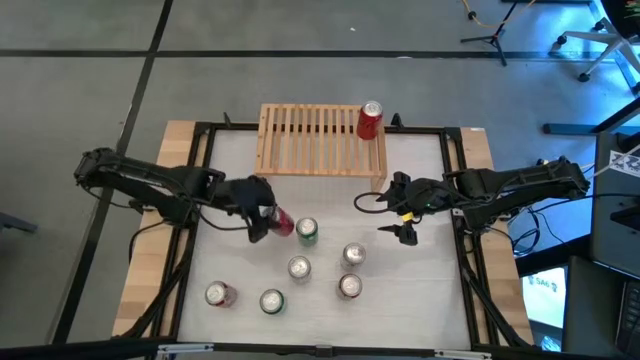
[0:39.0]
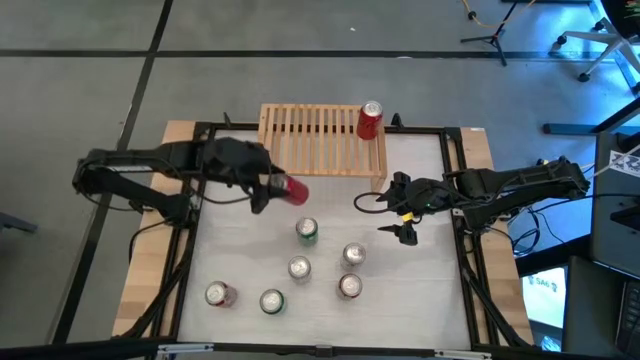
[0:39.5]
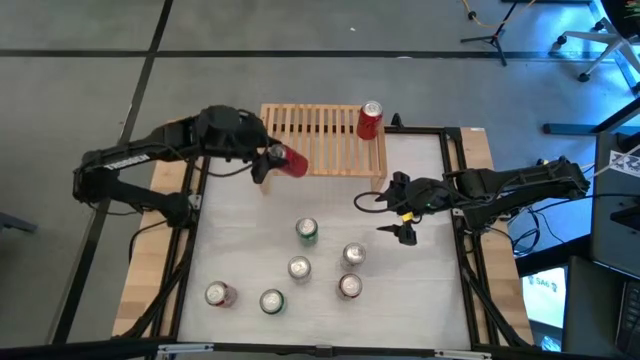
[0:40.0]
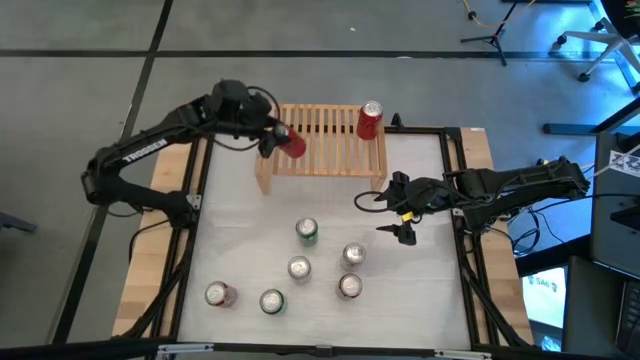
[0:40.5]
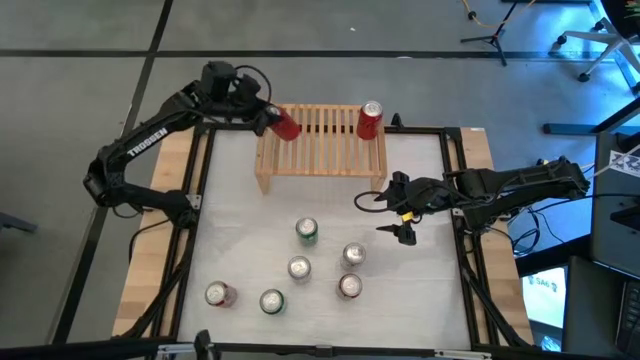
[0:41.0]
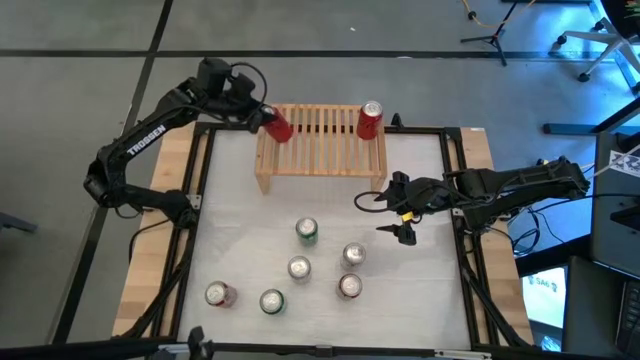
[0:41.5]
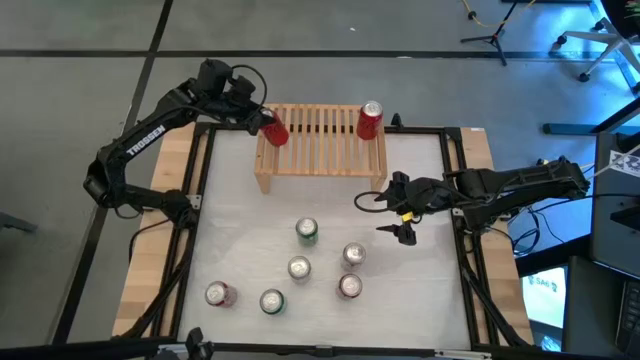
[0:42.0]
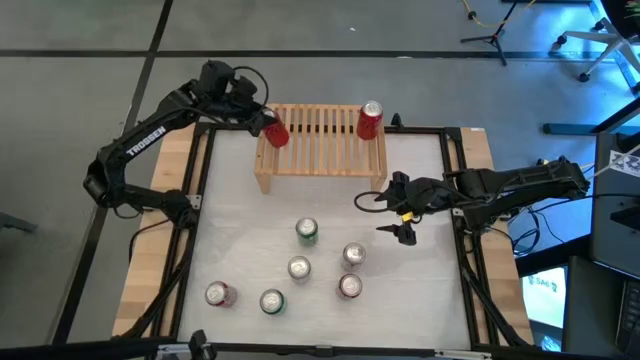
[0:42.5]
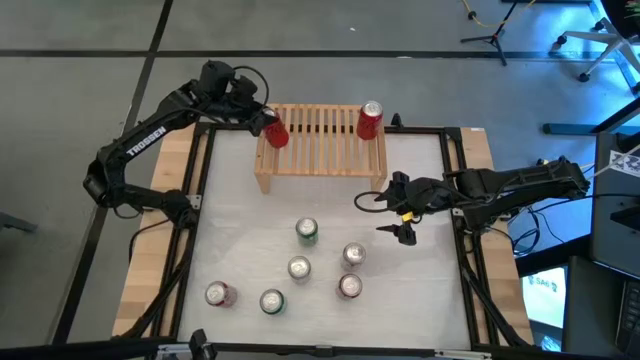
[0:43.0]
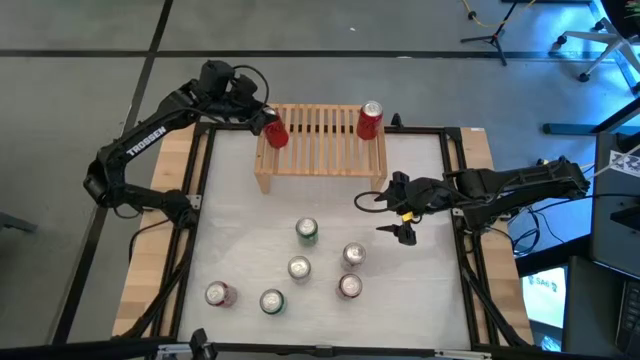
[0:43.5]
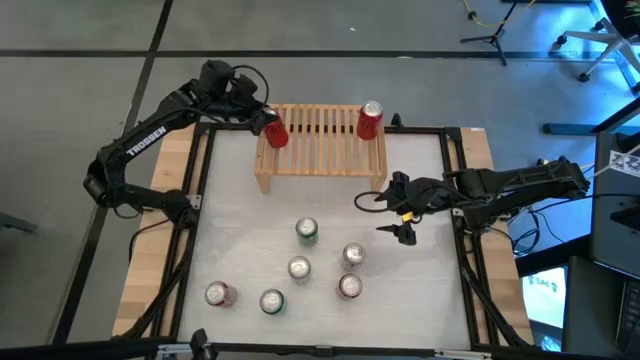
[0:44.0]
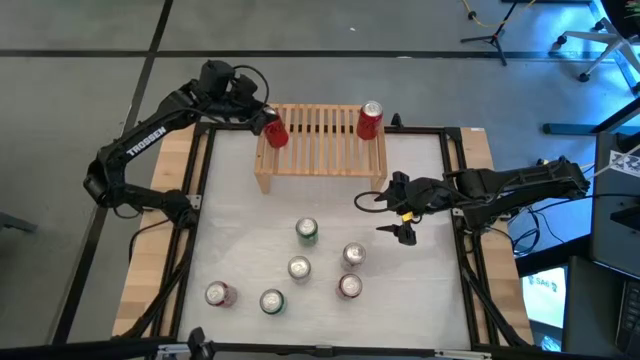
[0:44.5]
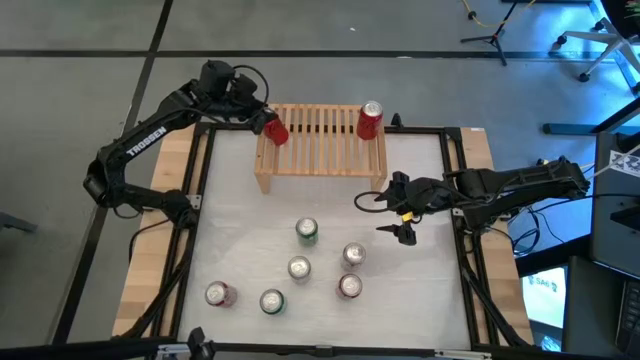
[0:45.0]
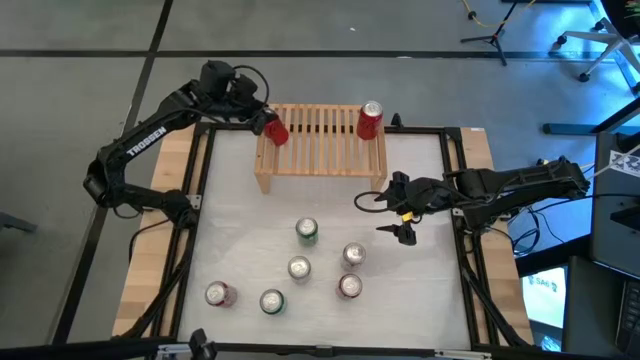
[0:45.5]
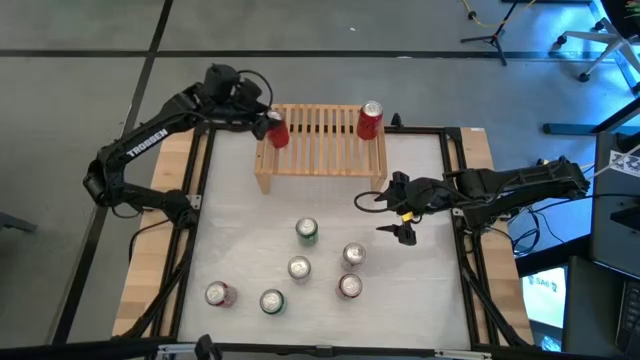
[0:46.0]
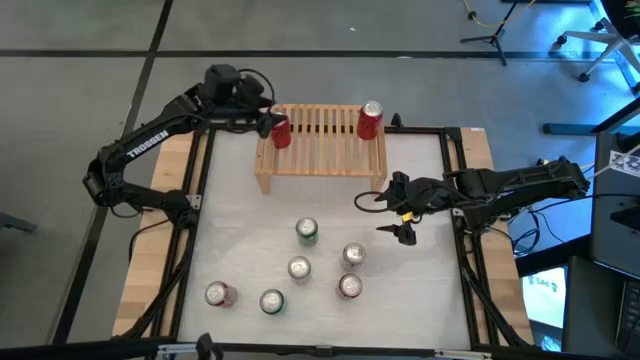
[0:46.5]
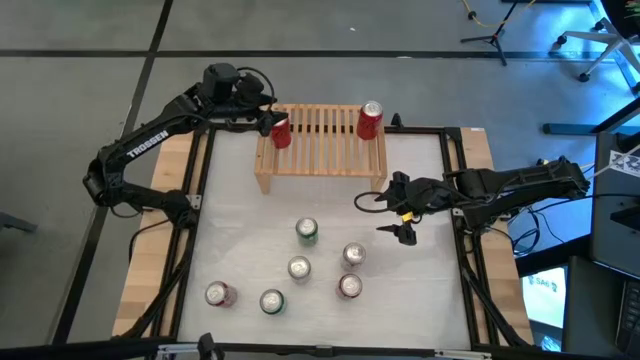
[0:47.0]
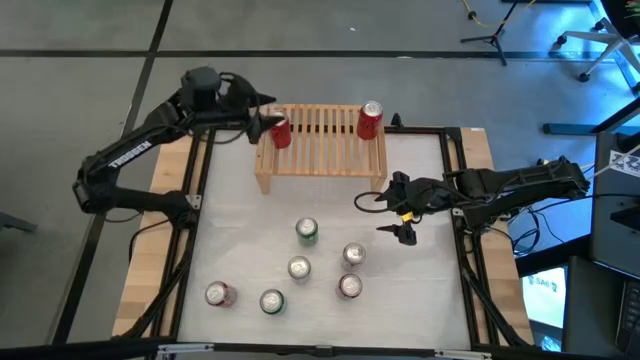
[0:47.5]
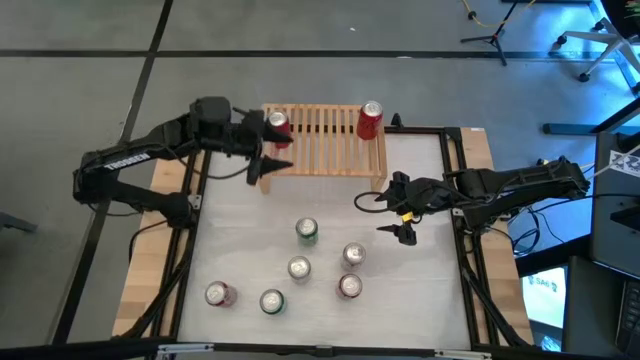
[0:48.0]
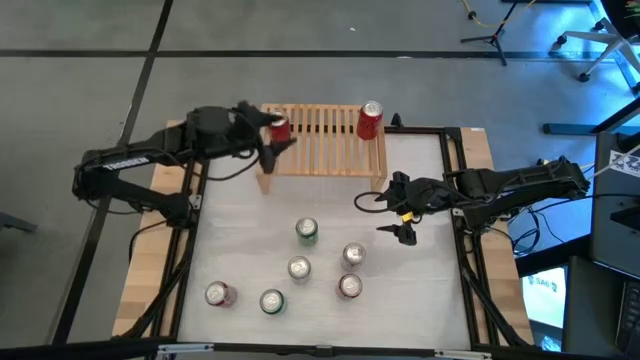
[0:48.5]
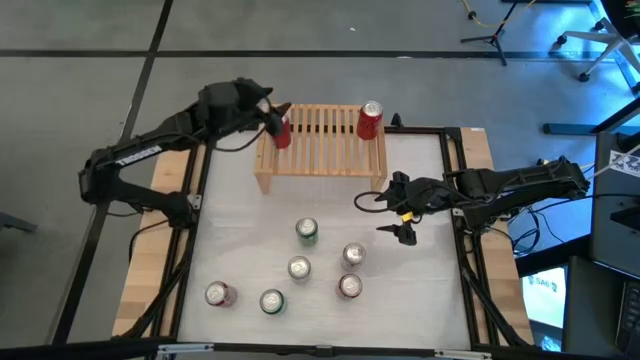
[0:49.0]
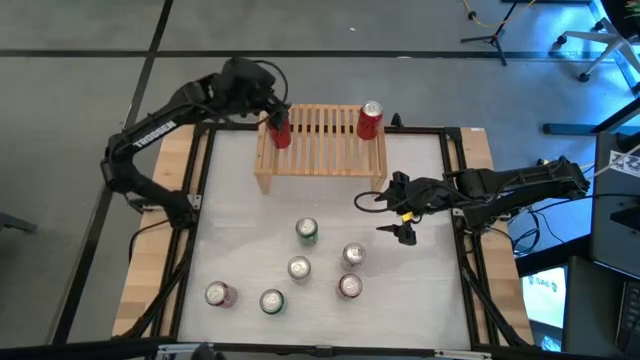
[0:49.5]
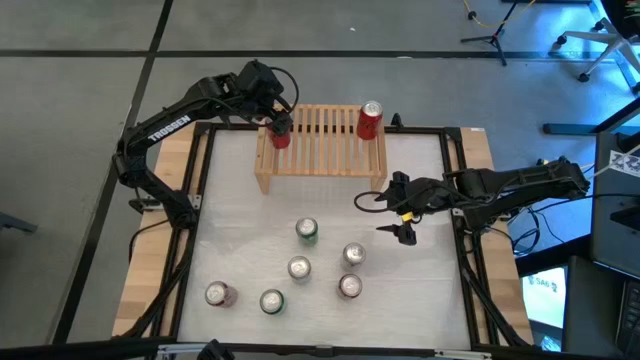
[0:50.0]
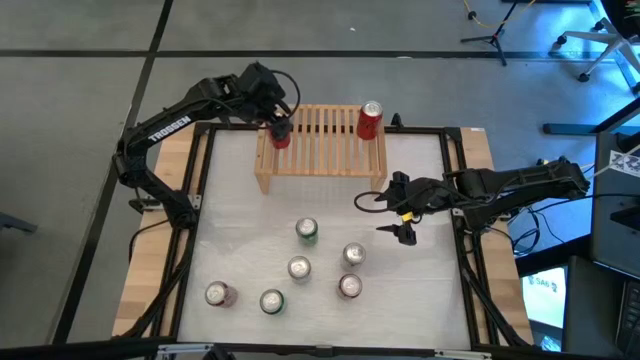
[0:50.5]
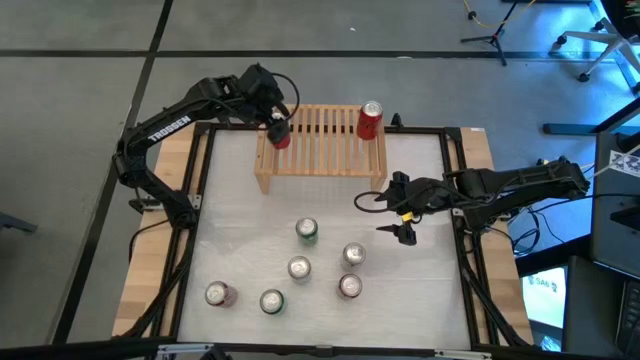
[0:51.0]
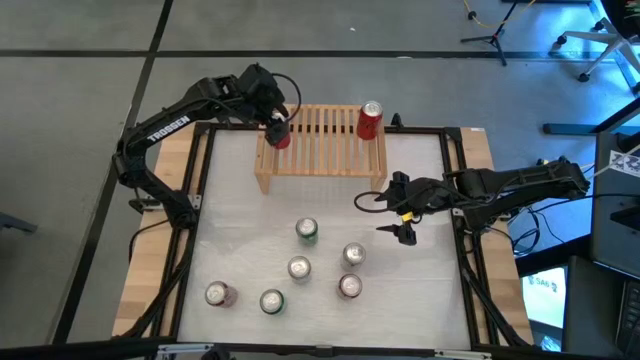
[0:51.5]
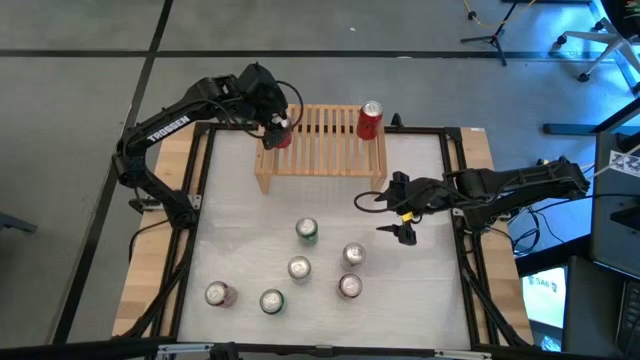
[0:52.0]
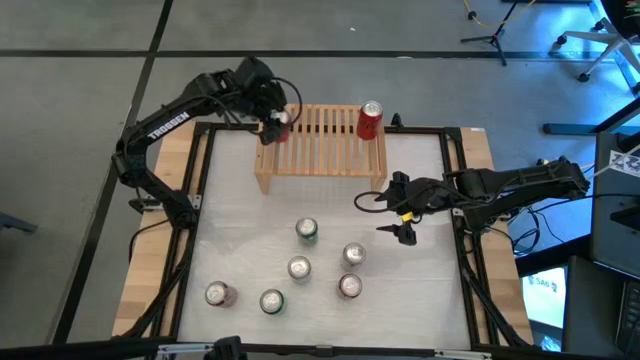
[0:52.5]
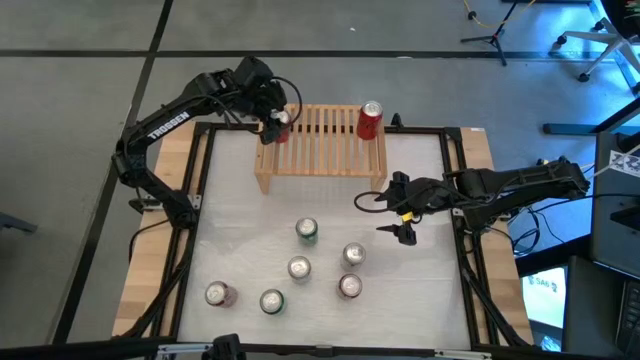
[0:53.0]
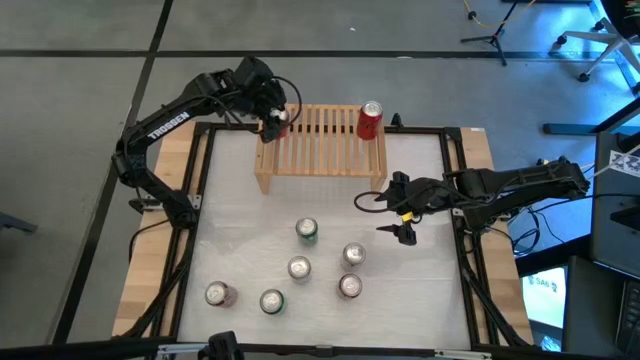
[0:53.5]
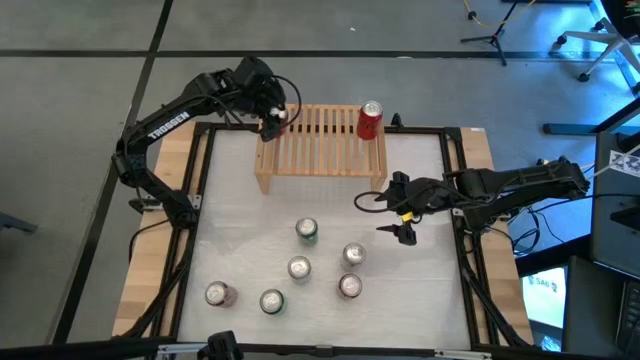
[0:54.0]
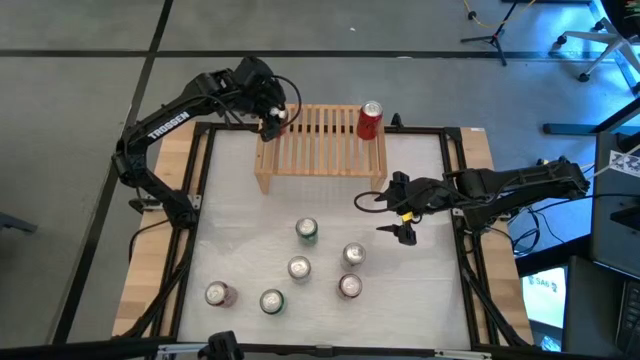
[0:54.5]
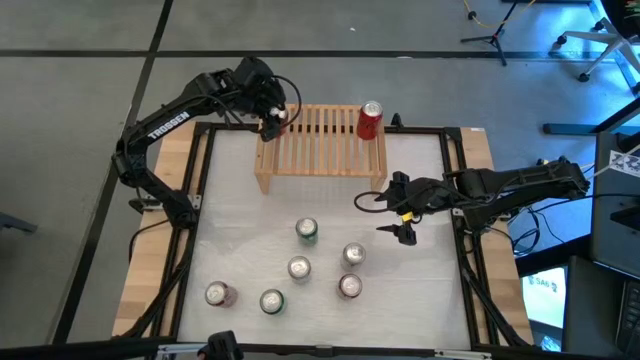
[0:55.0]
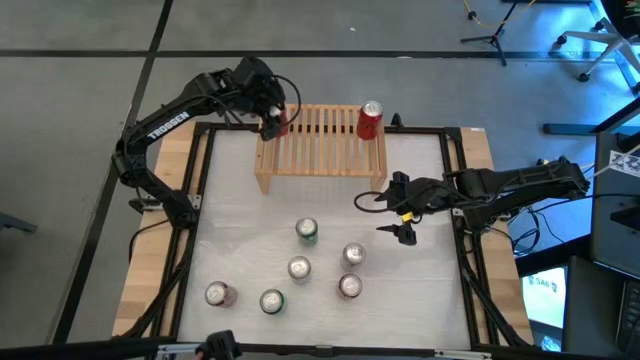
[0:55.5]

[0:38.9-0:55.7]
Task: Place canned beverage on shelf
Put the red black soda can on the shelf

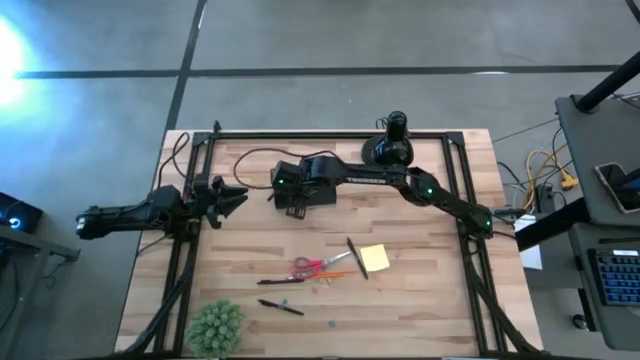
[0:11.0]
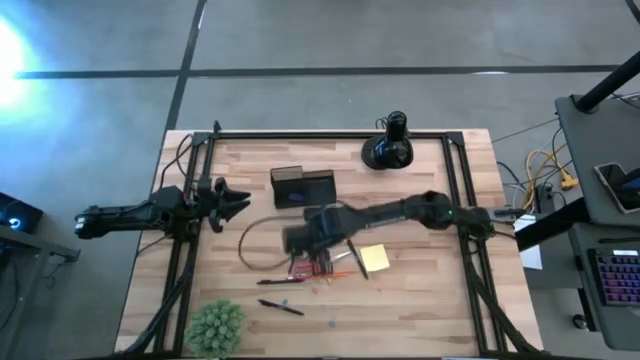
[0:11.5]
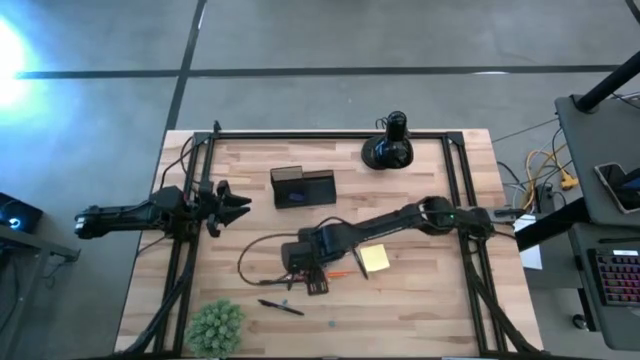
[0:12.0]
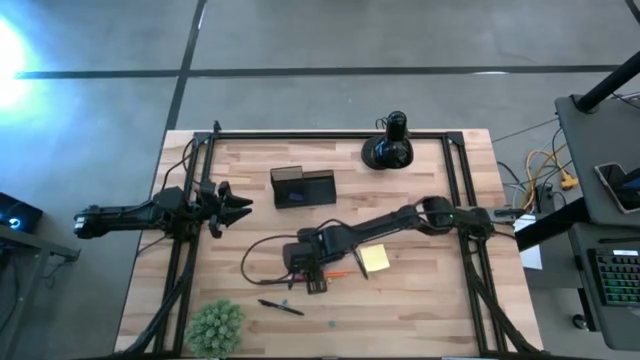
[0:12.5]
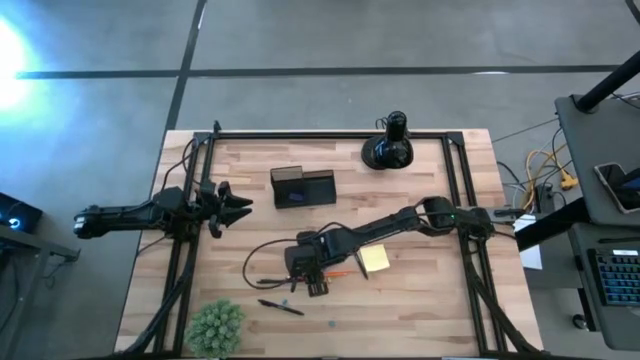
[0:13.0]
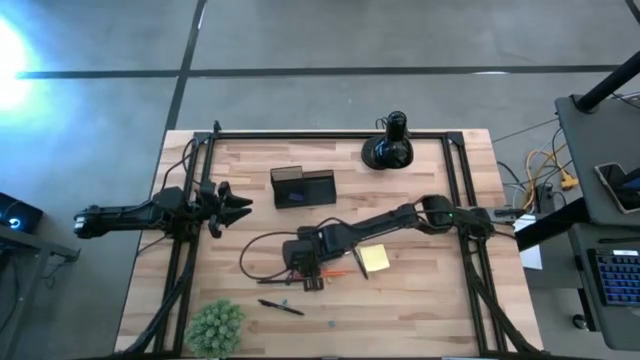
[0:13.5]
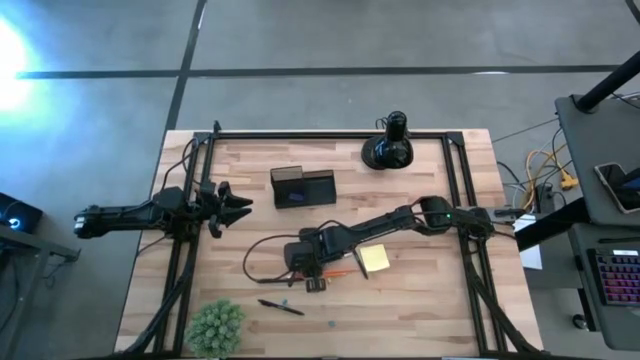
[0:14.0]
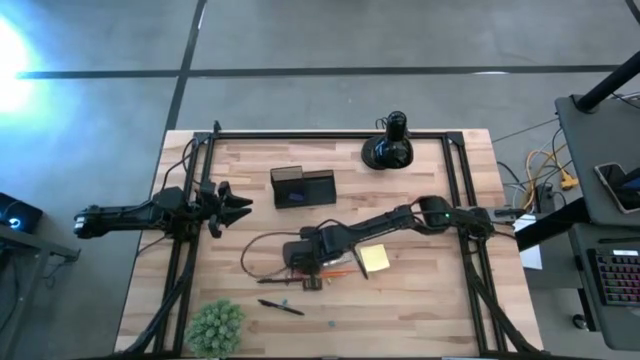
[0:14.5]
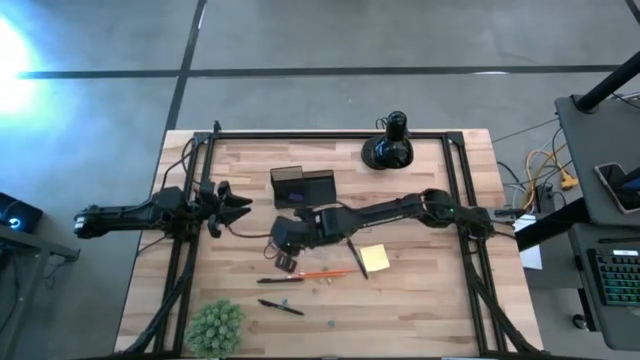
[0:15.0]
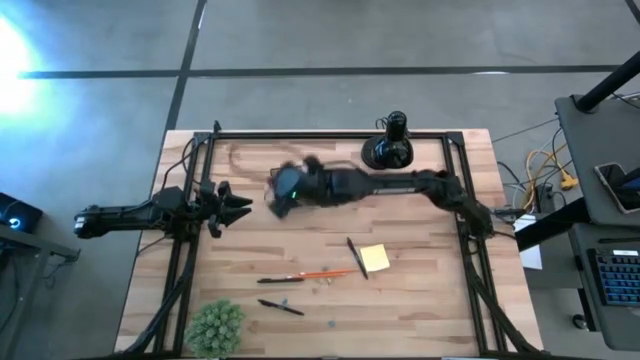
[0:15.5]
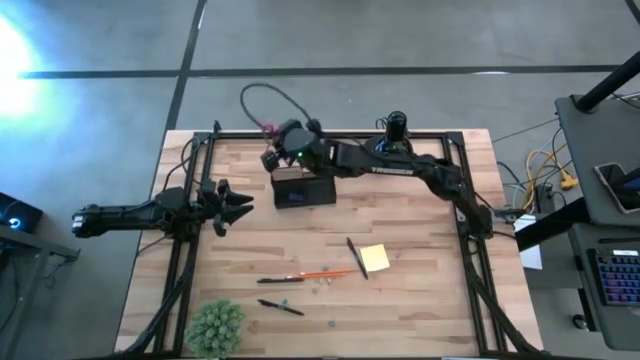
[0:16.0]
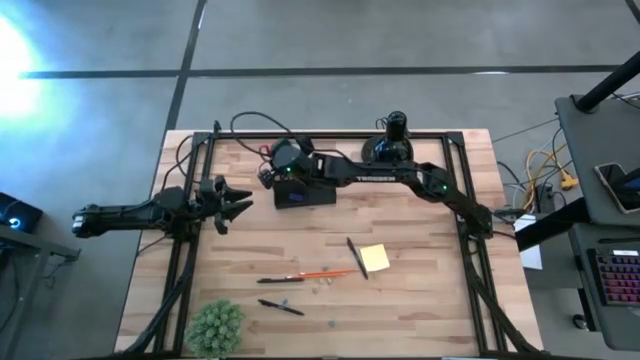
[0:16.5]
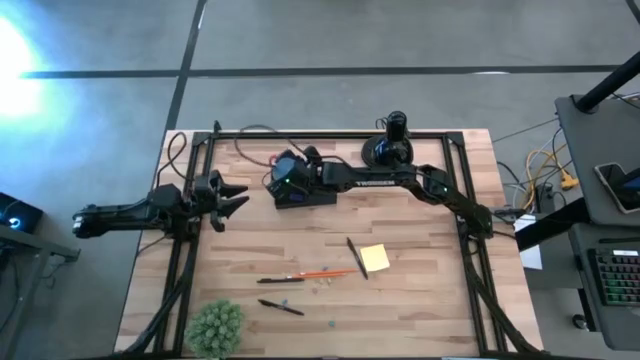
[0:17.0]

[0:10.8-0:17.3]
Task: Pick and place office supplies into organizer
Put the scissors into the black organizer
